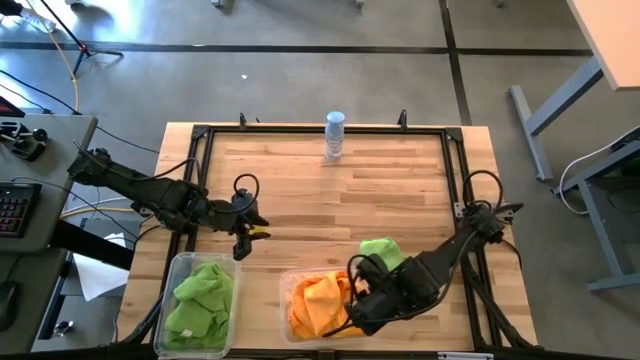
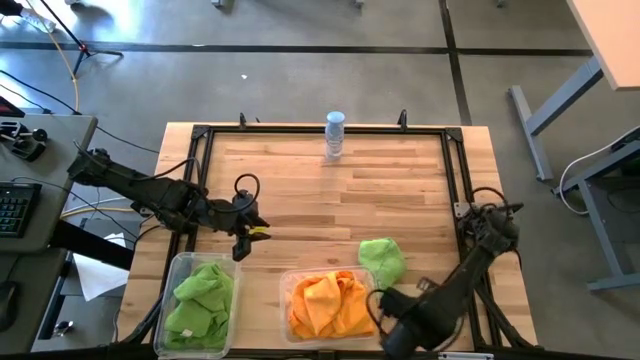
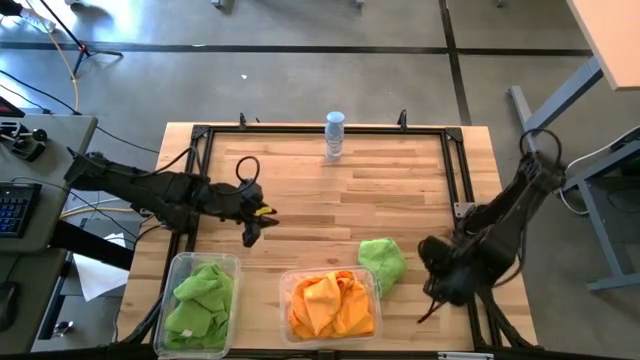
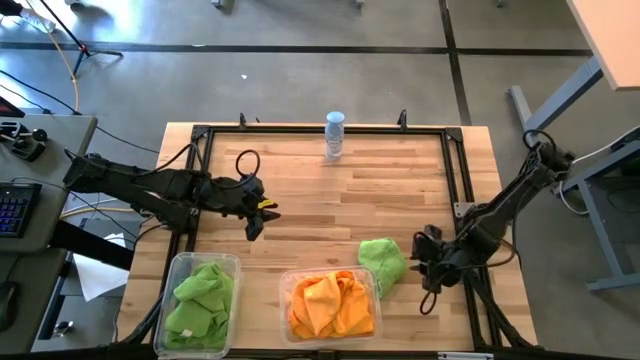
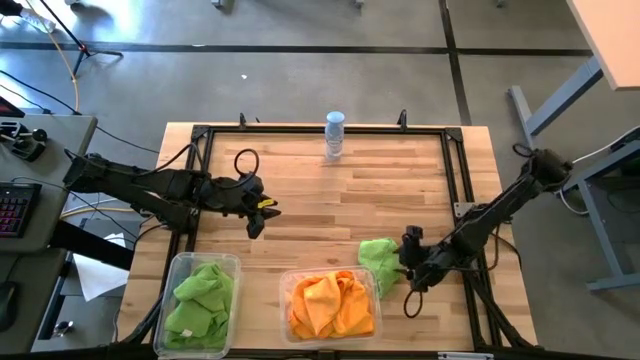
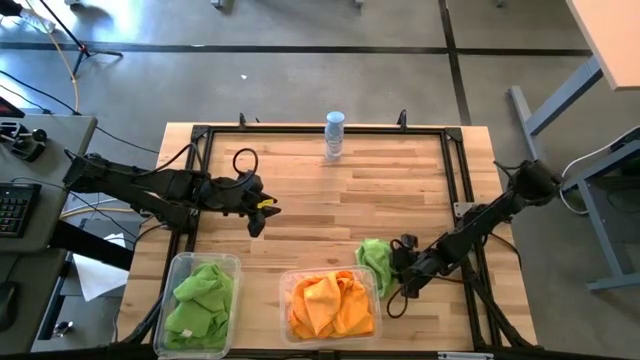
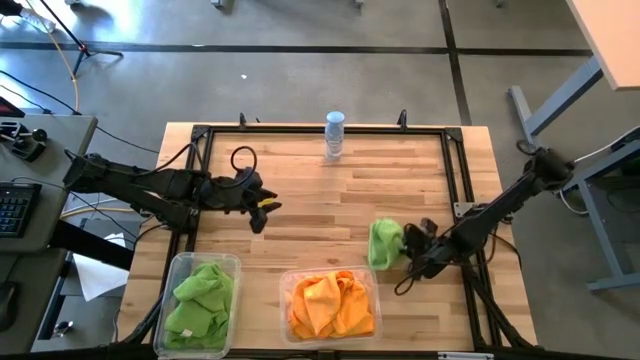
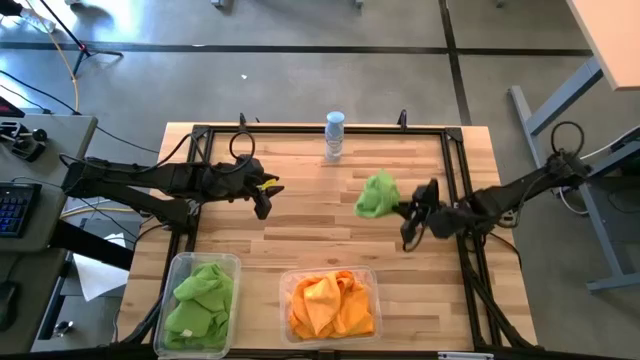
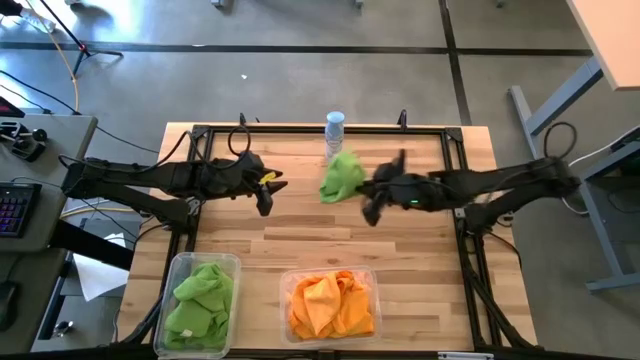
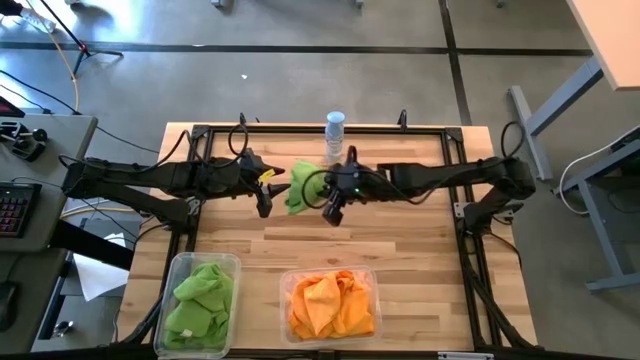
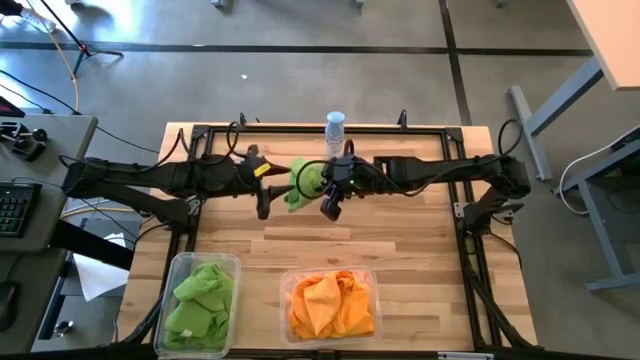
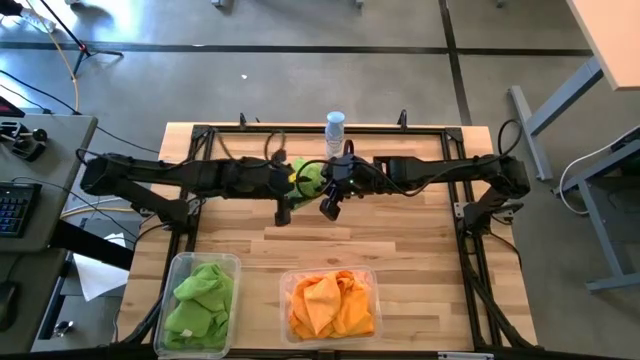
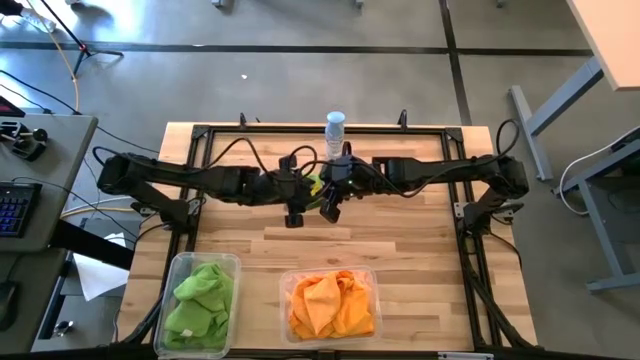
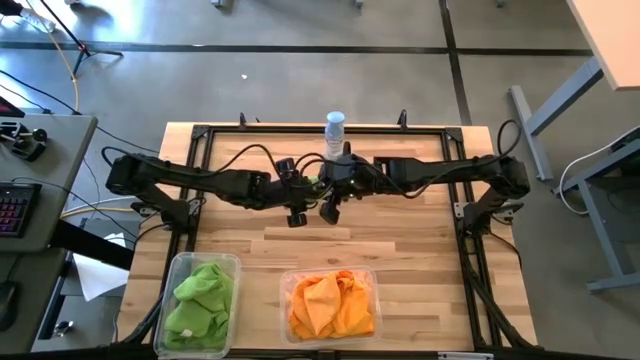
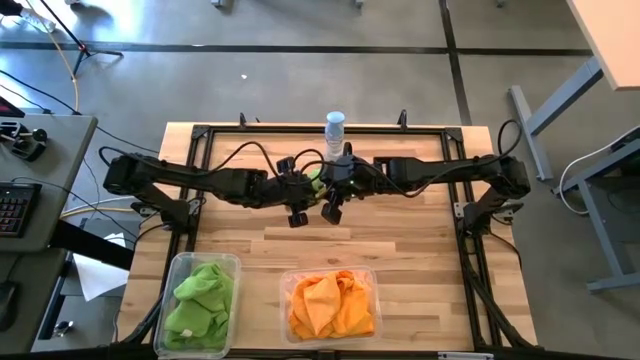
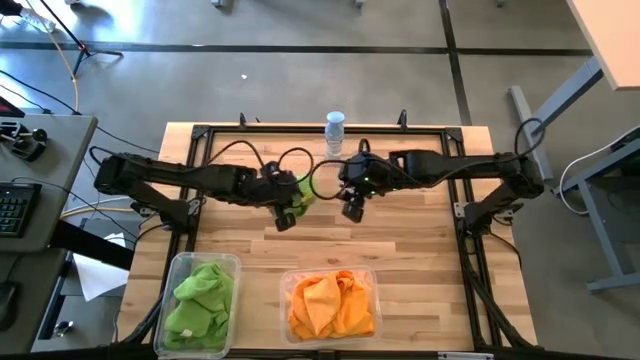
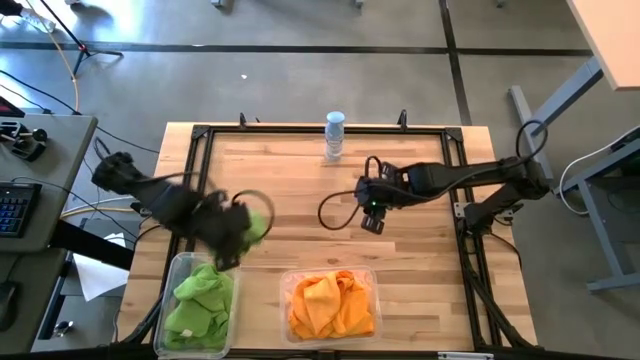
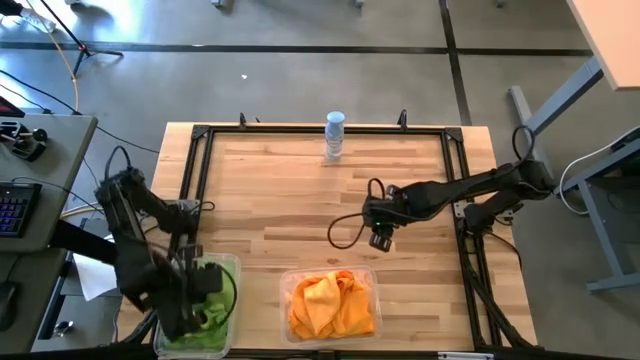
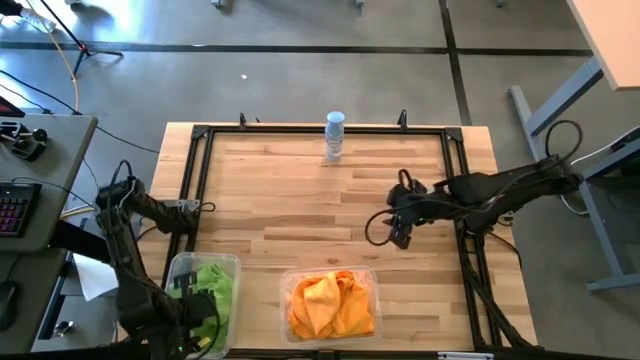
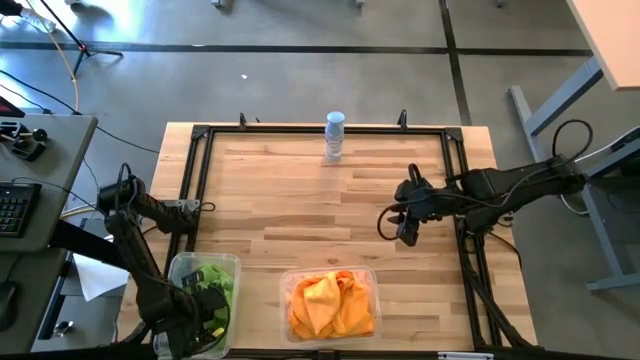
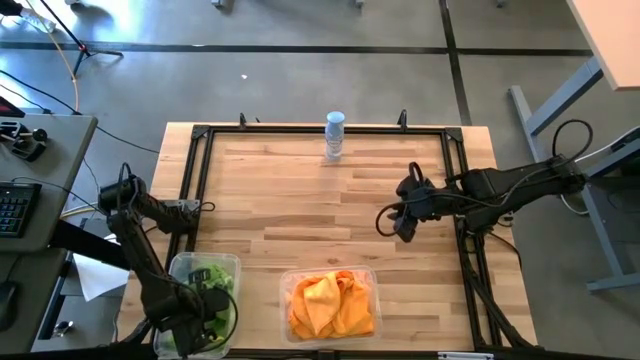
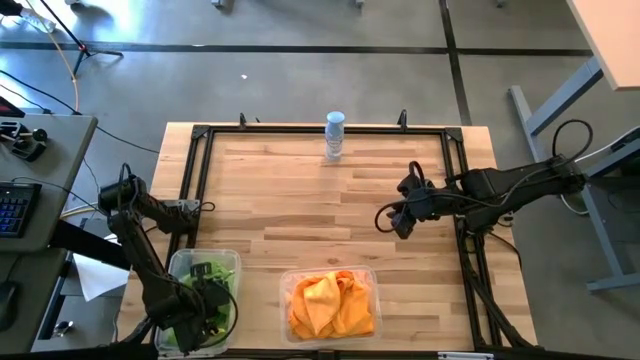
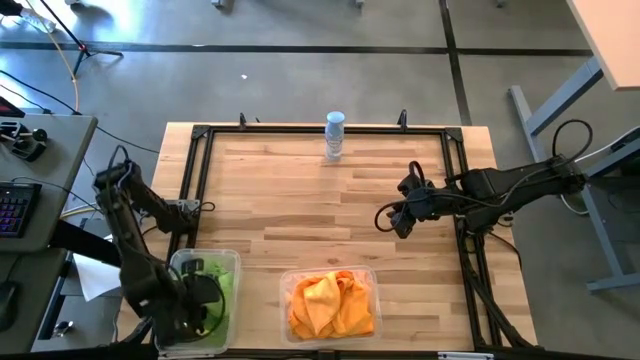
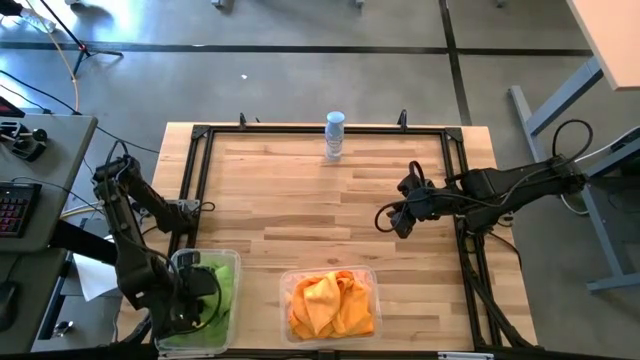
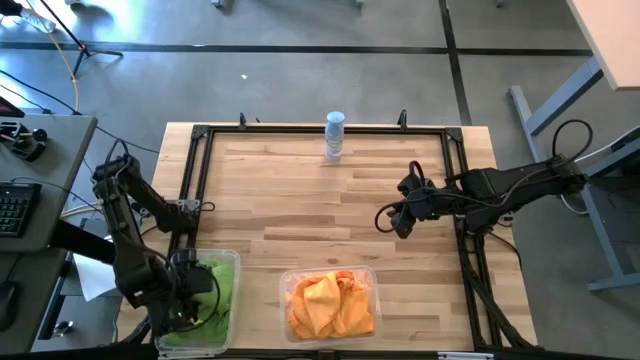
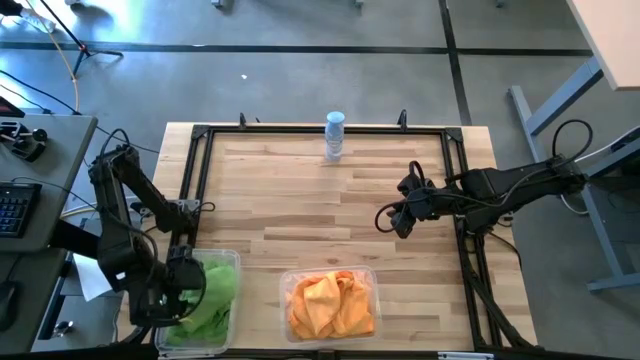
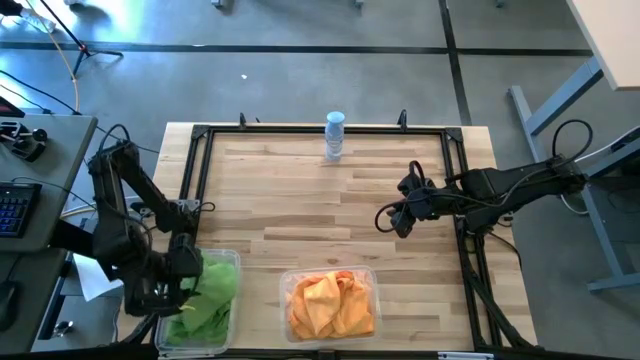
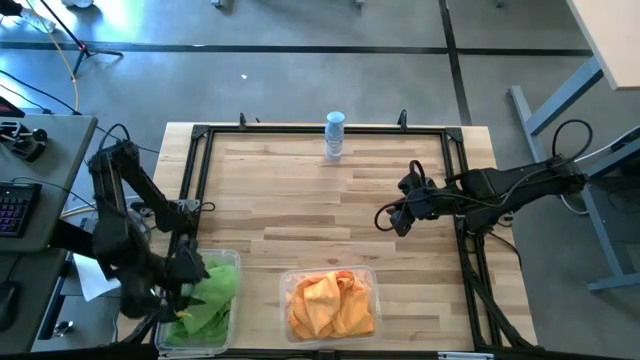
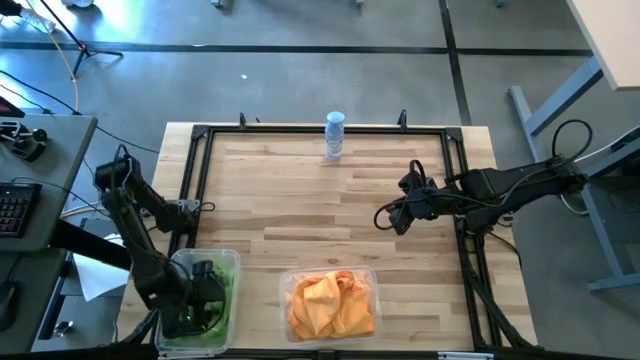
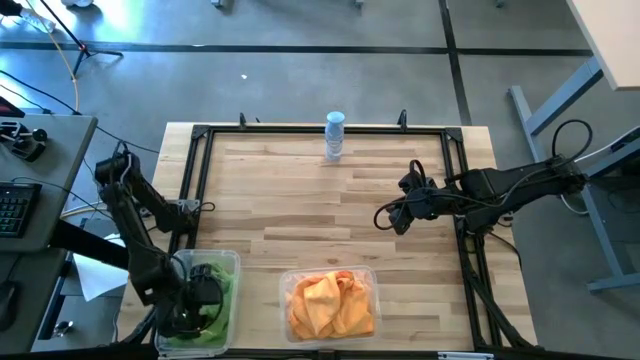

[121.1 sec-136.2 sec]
Task: Sort microfiber towel by color & place in baskets
Put the green microfiber towel into the left transparent bin

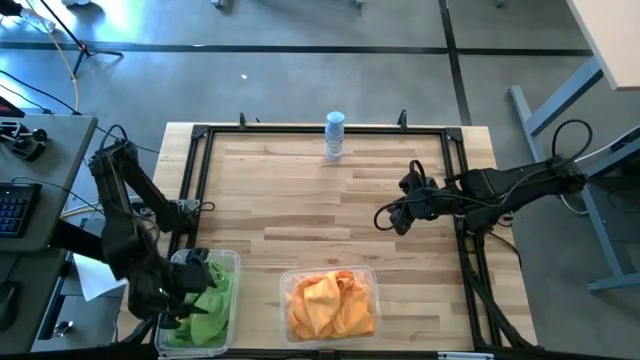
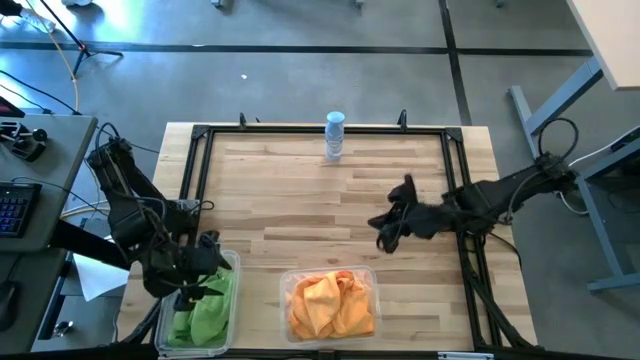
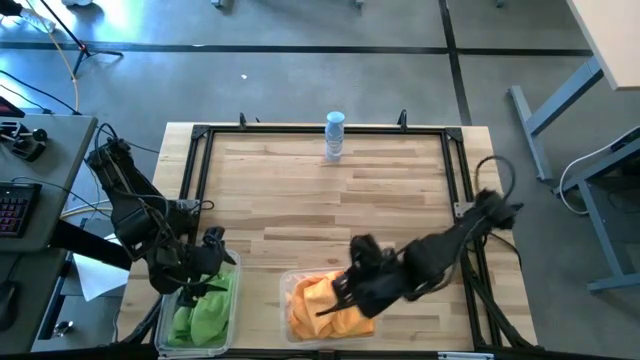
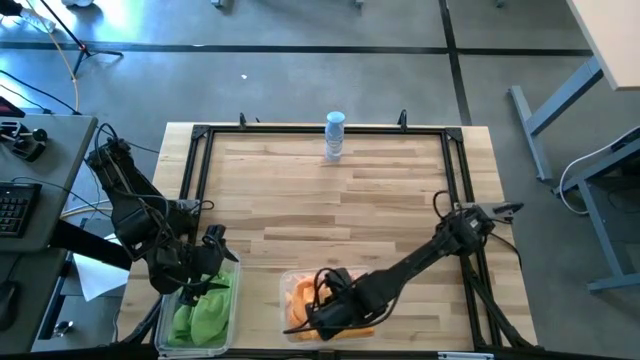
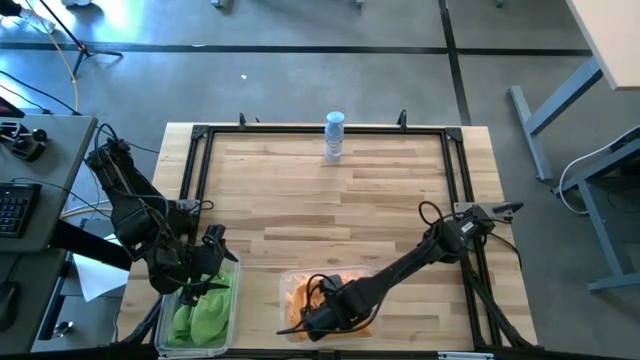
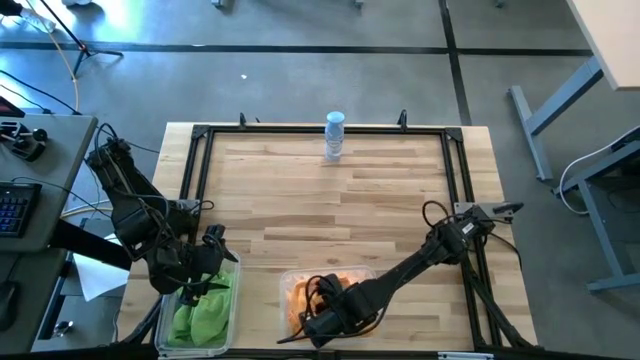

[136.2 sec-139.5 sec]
Adjust the orange microfiber towel

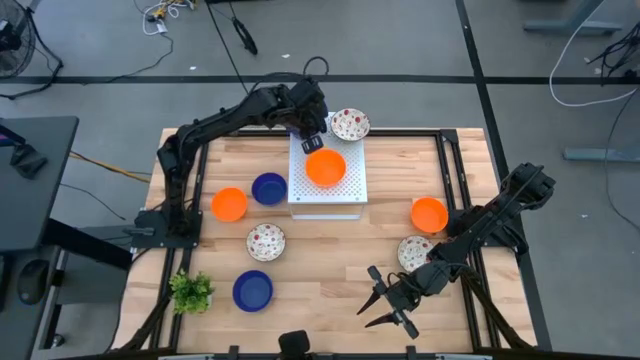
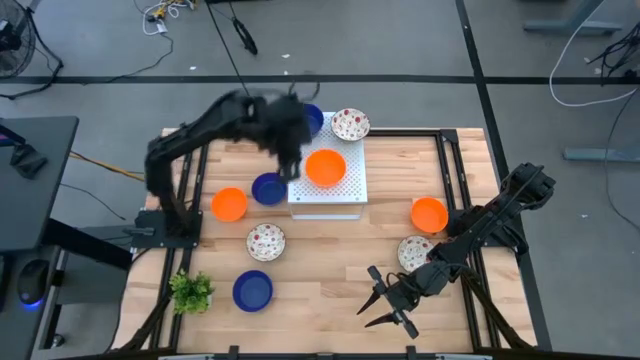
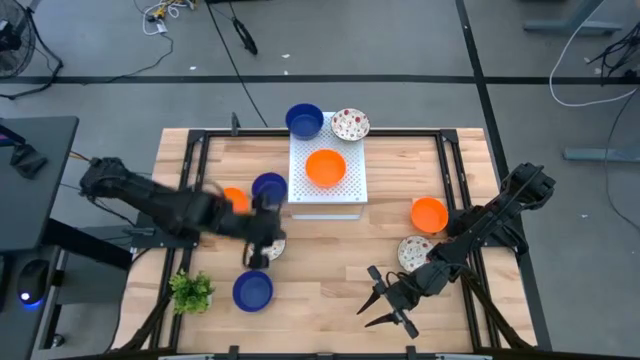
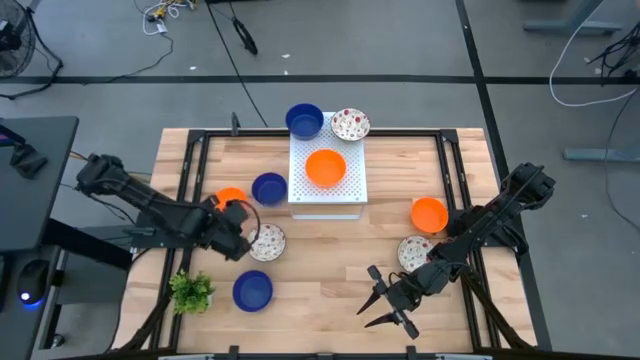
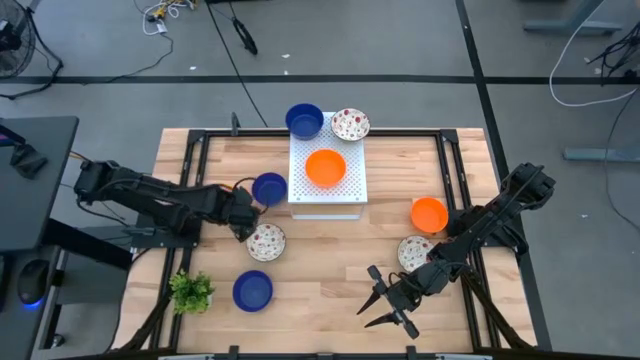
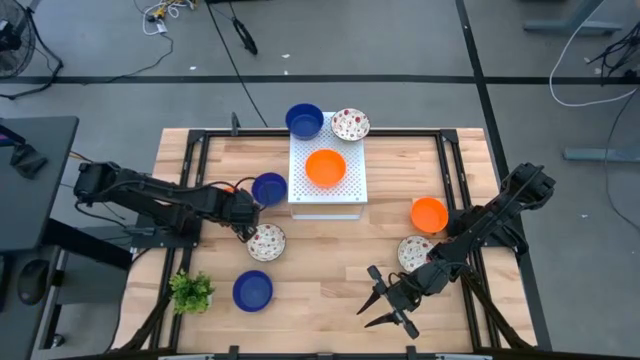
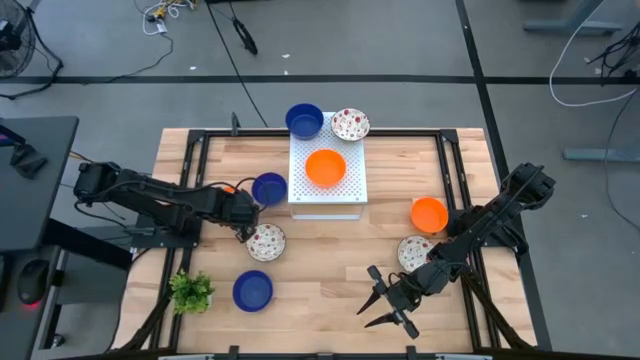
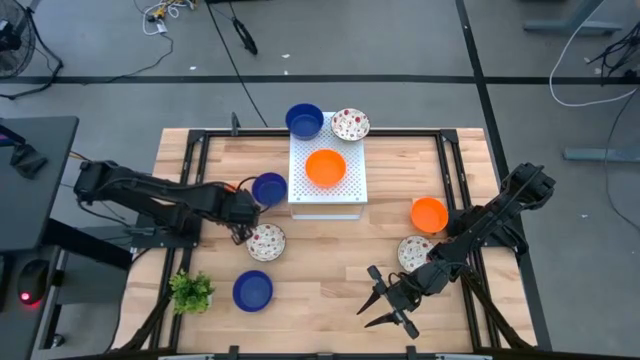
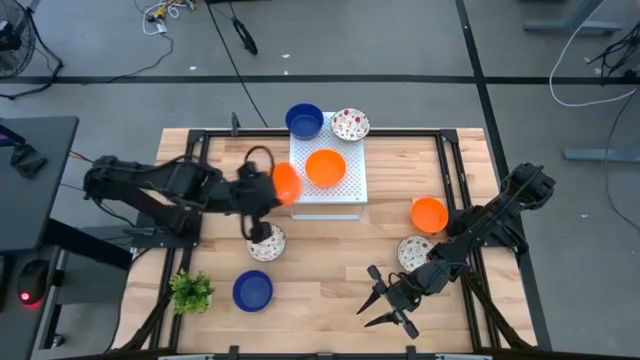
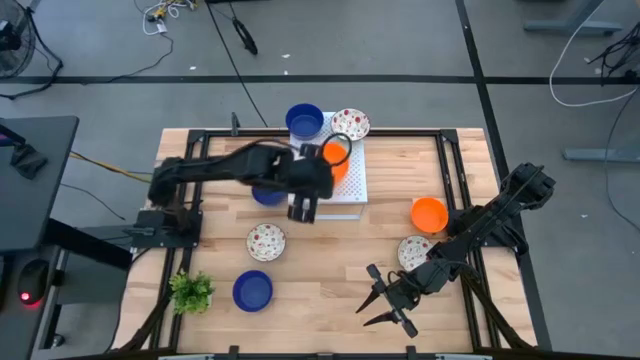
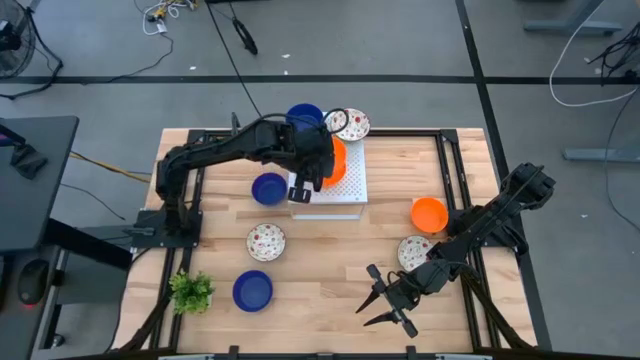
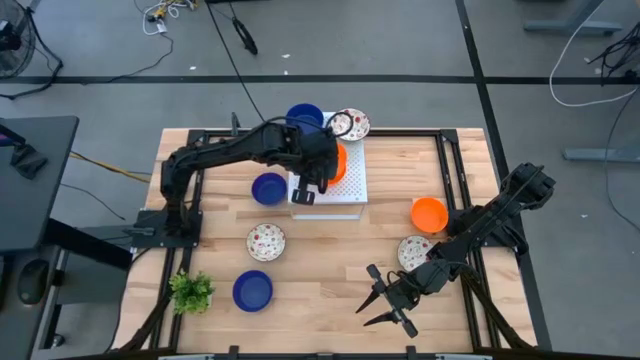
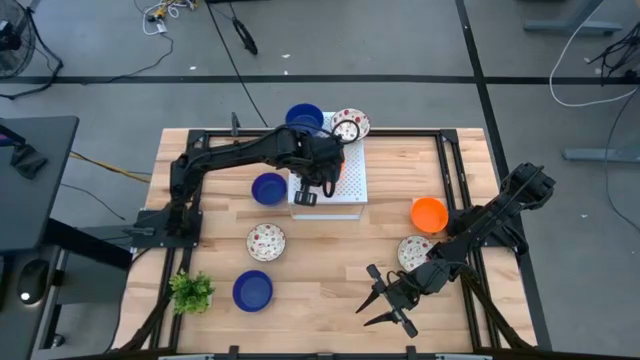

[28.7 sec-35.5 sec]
Task: Pick & Place Mini bowls
Stack the left orange bowl on top of the other orange bowl on the shelf
